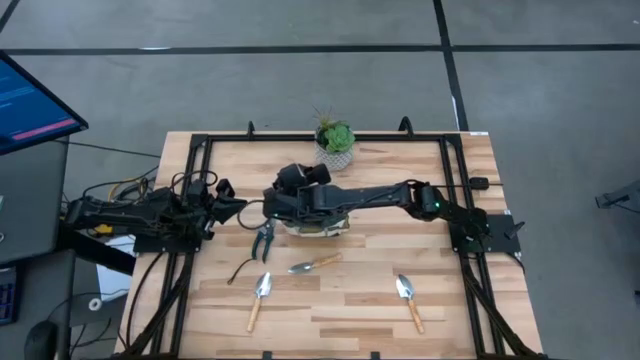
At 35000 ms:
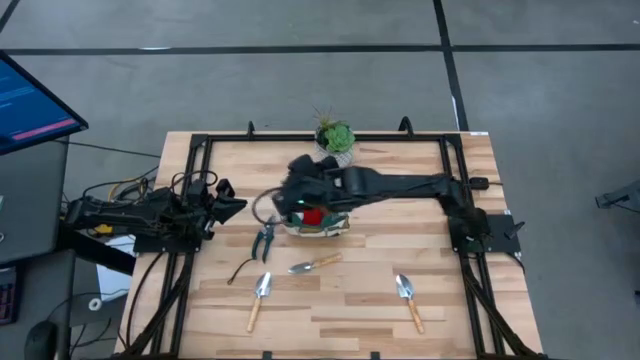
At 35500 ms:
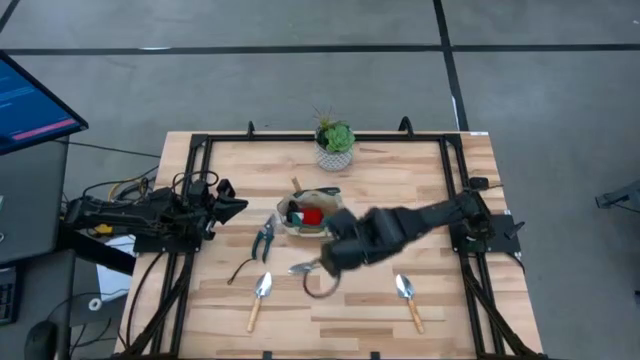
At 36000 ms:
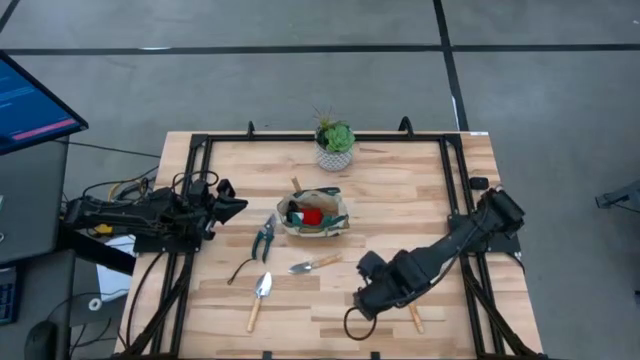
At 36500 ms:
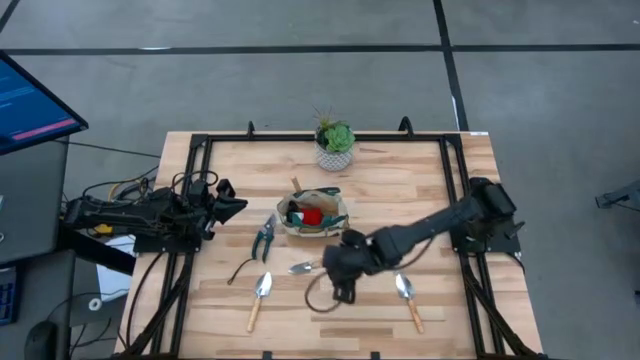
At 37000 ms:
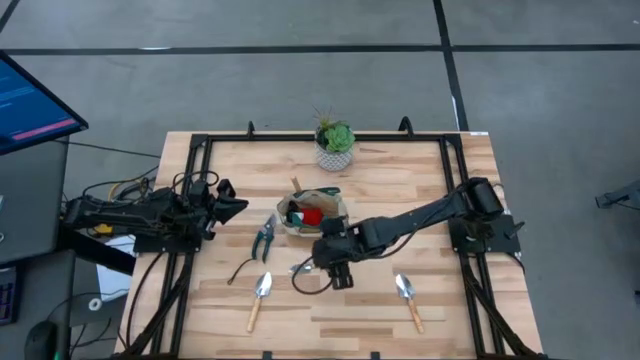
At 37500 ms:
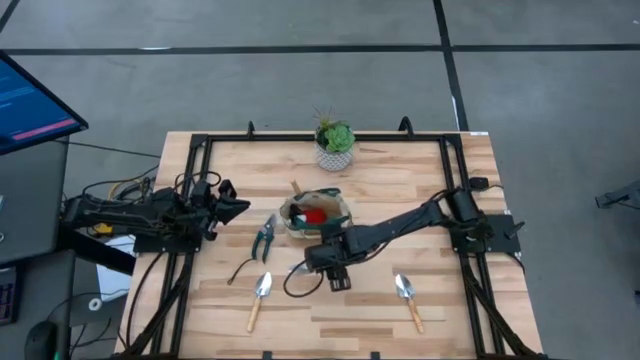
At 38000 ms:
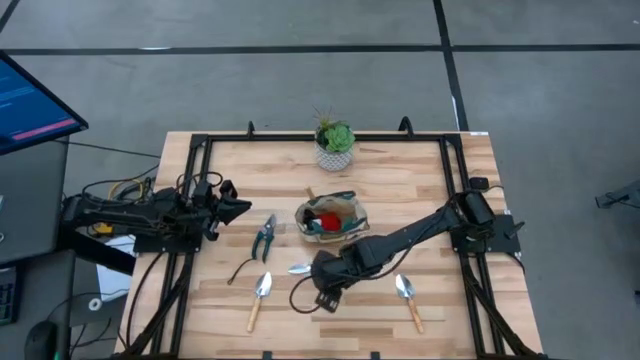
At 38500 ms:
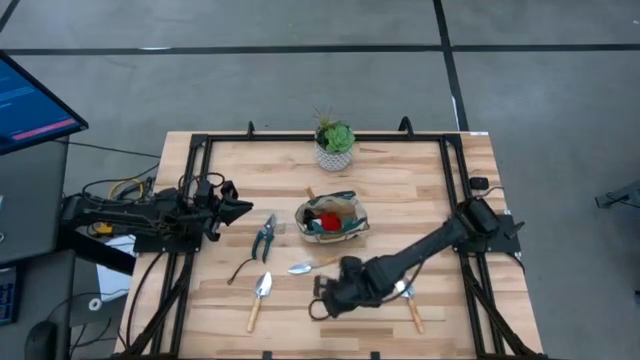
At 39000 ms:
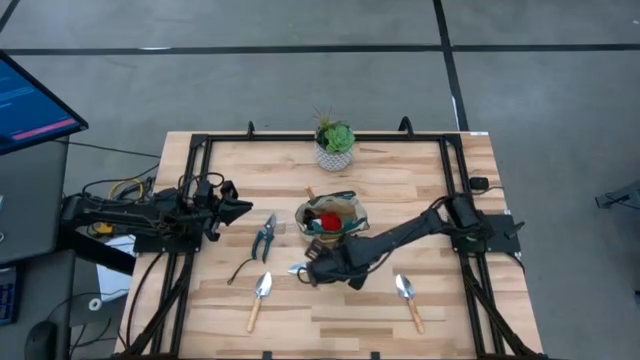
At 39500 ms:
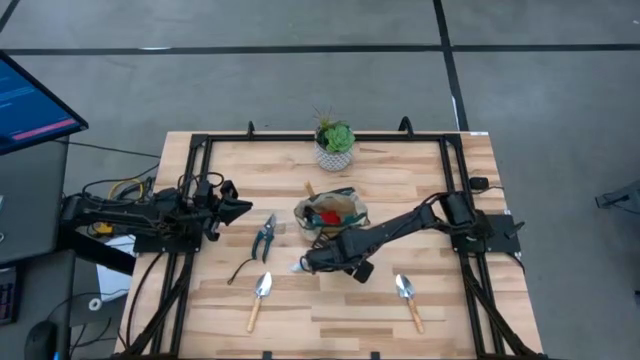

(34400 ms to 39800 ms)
Task: Pick & Place Garden tools in Gardening bag
Put the small trowel into the gardening bag

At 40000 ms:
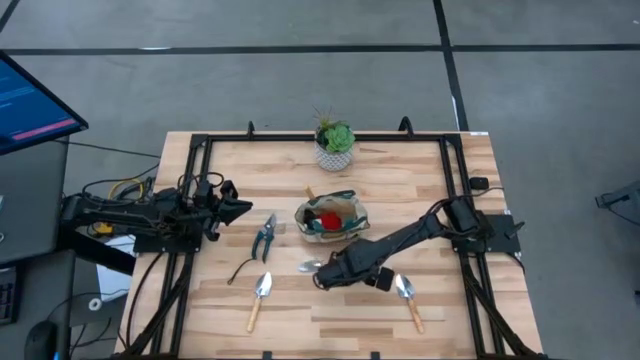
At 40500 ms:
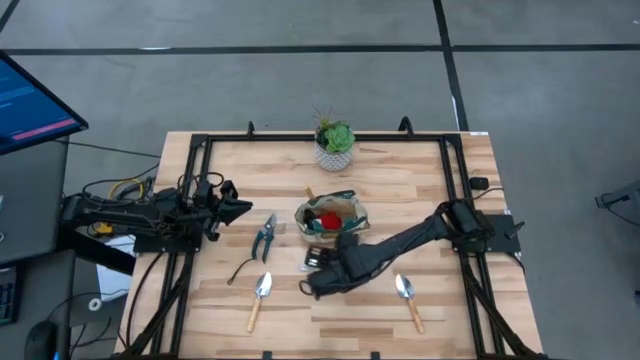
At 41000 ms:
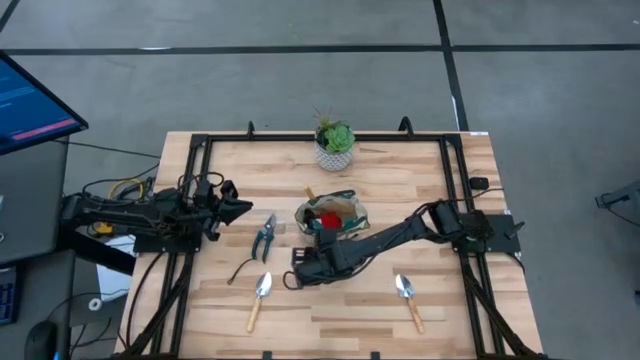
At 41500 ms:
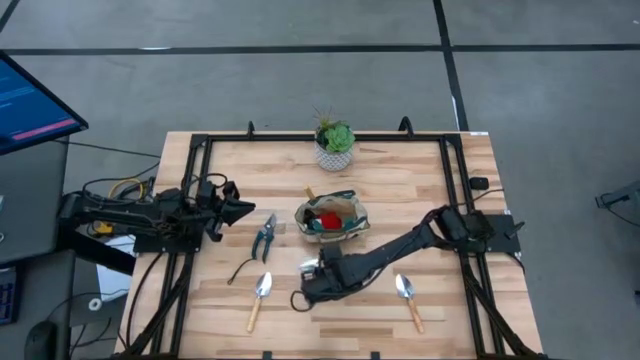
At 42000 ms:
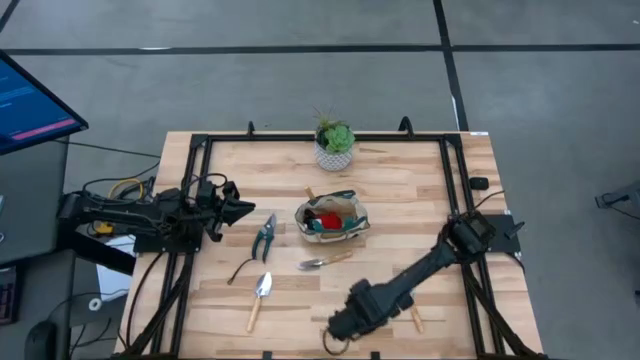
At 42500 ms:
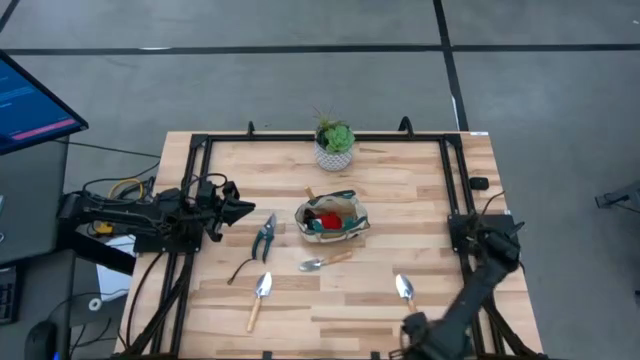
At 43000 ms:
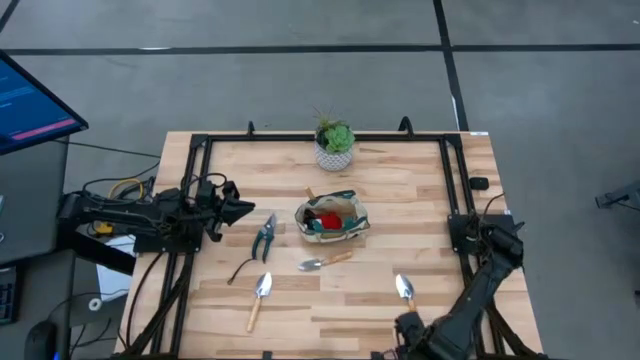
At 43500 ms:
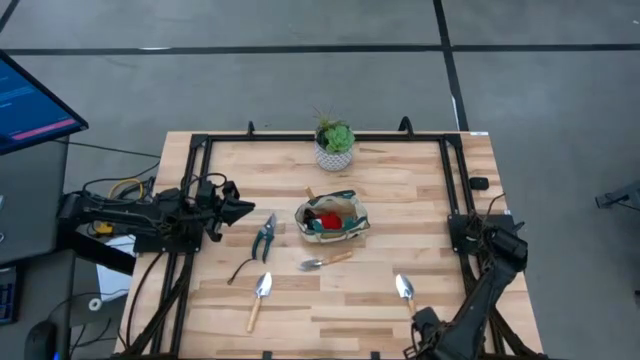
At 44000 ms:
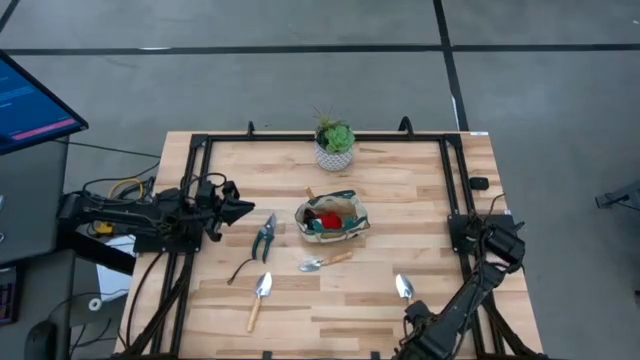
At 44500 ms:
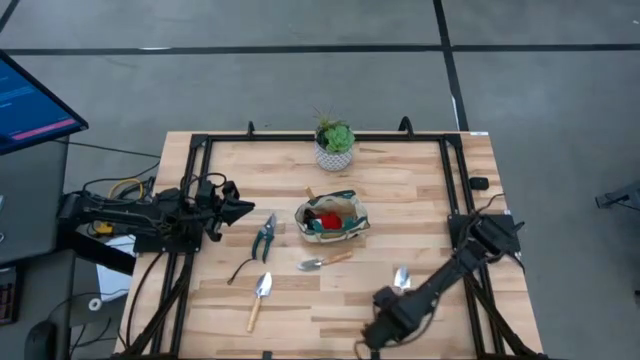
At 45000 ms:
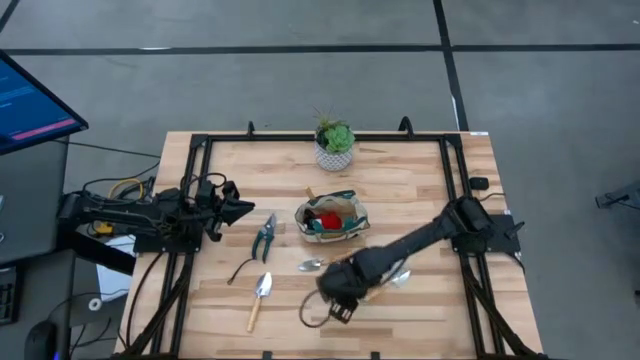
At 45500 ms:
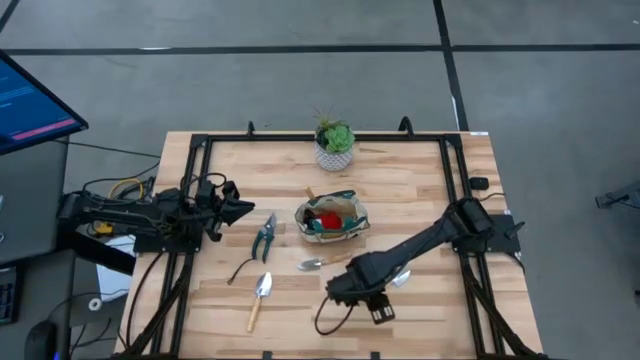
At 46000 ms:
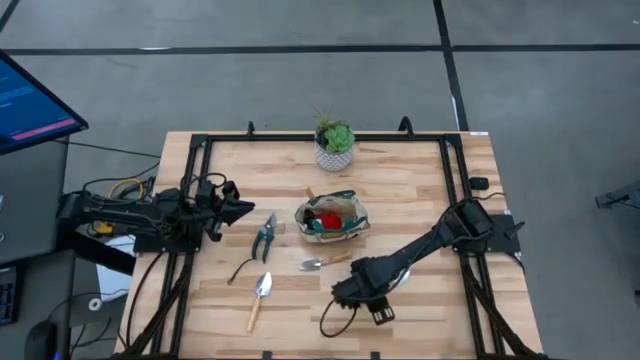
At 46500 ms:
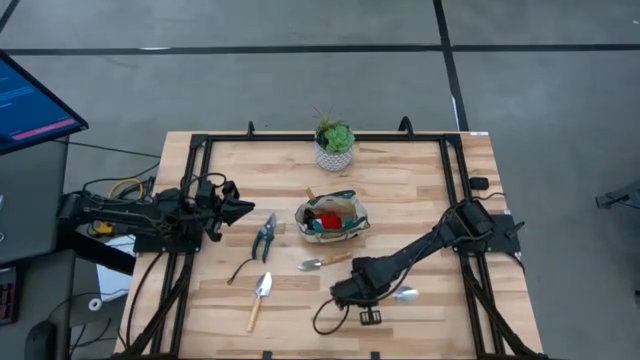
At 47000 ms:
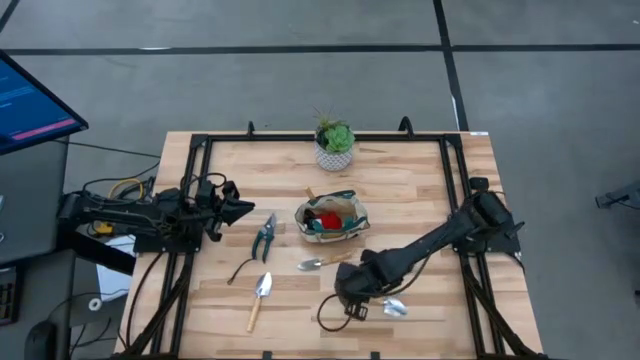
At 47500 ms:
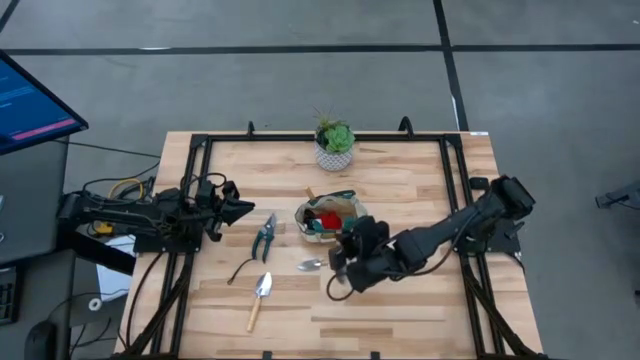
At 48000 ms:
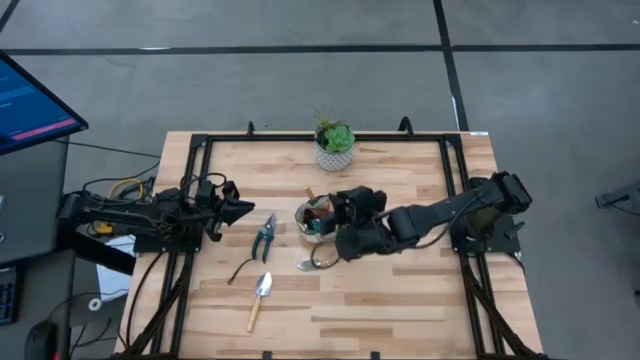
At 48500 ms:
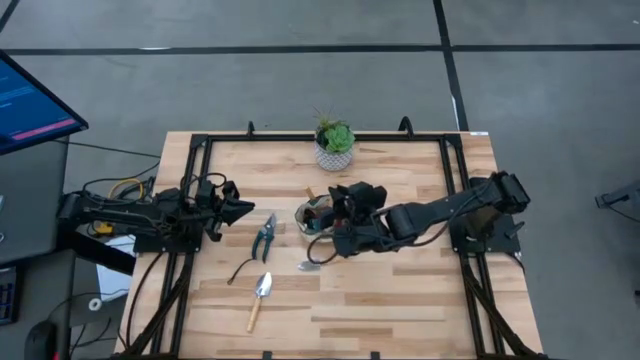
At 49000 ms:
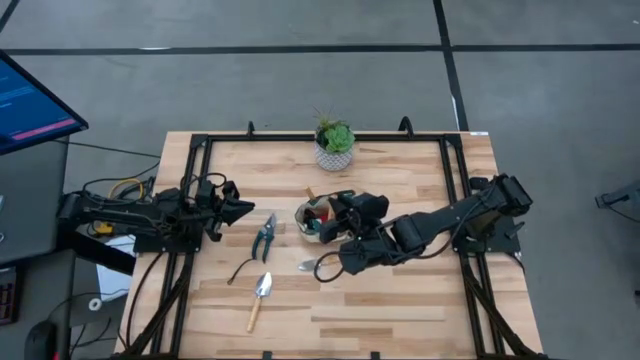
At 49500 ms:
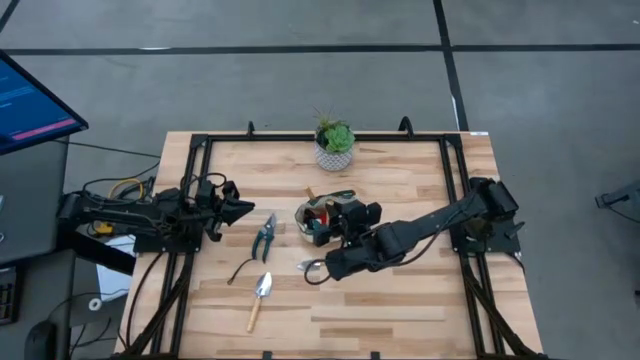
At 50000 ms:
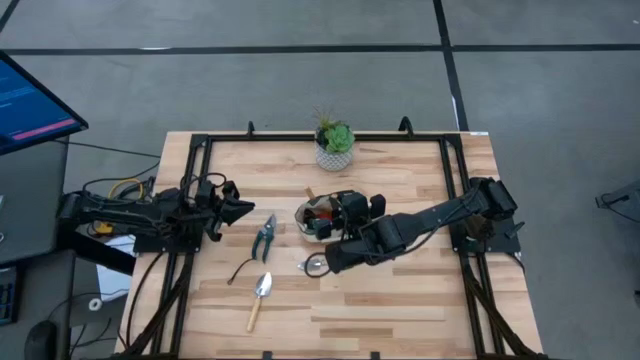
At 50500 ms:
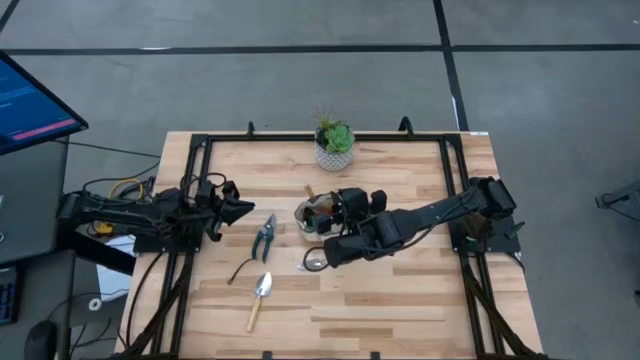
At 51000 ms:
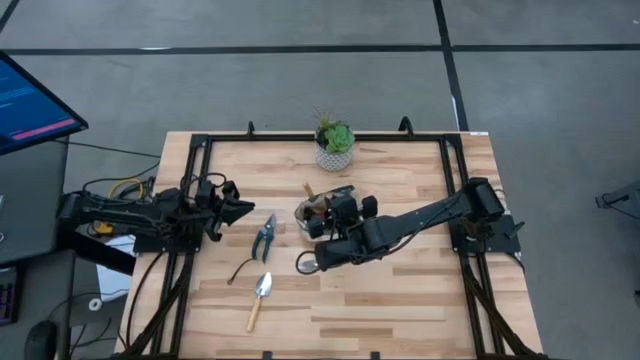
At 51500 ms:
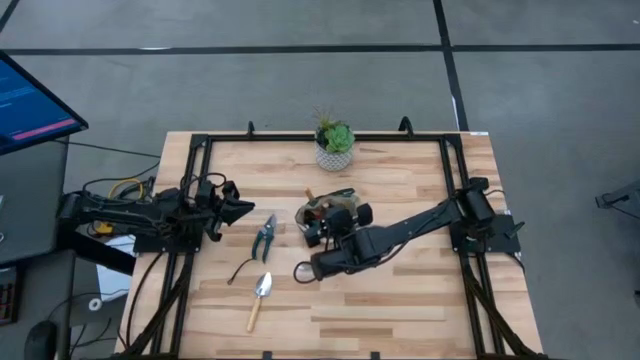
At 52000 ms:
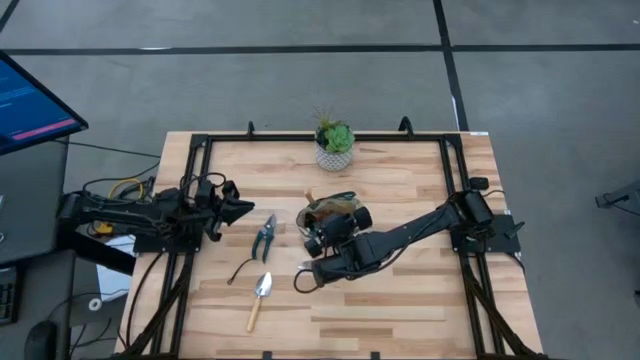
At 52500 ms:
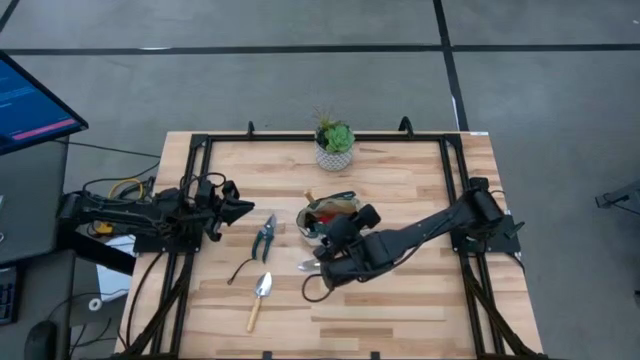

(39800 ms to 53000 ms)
Put the right trowel into the gardening bag

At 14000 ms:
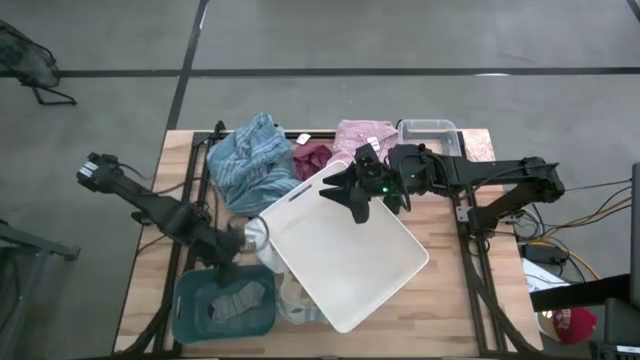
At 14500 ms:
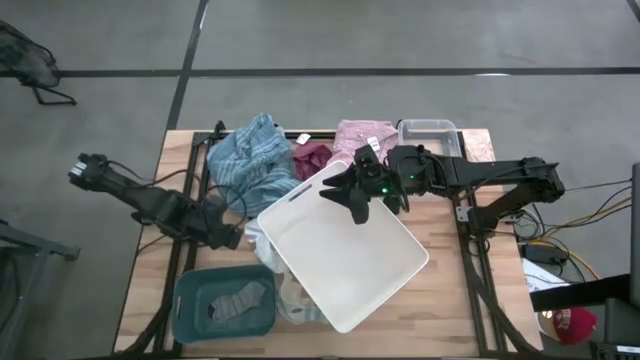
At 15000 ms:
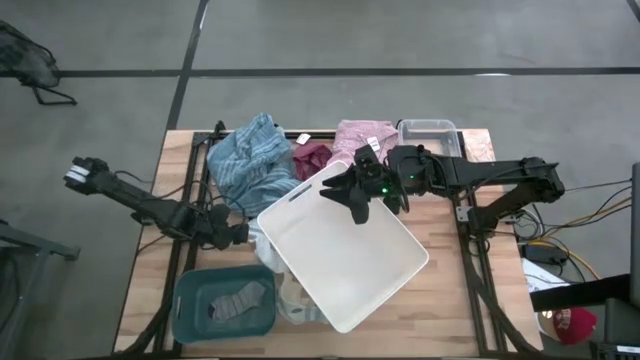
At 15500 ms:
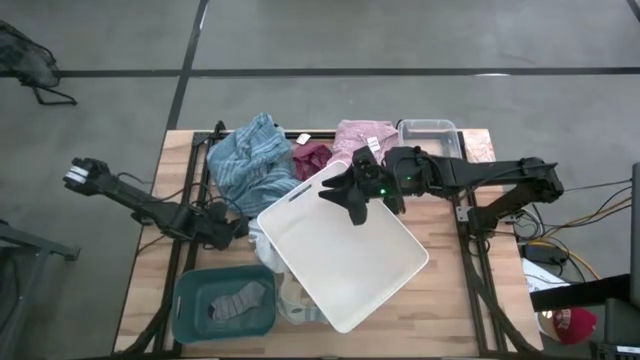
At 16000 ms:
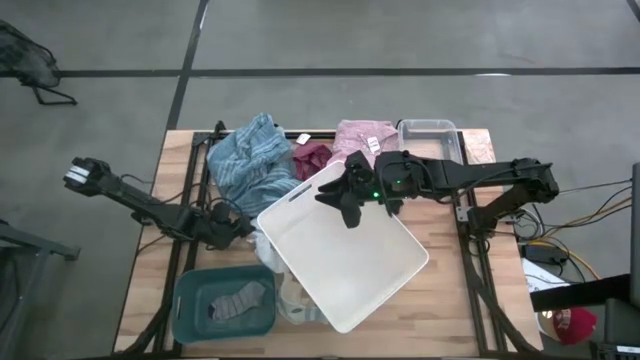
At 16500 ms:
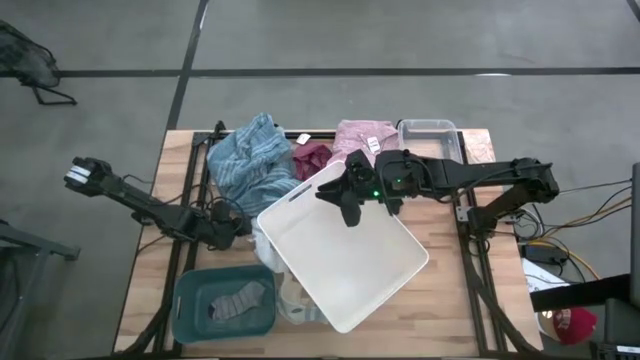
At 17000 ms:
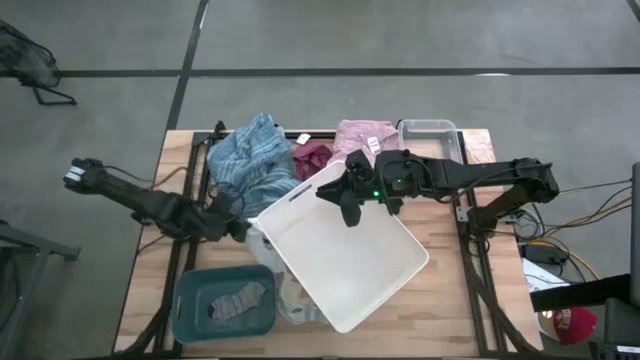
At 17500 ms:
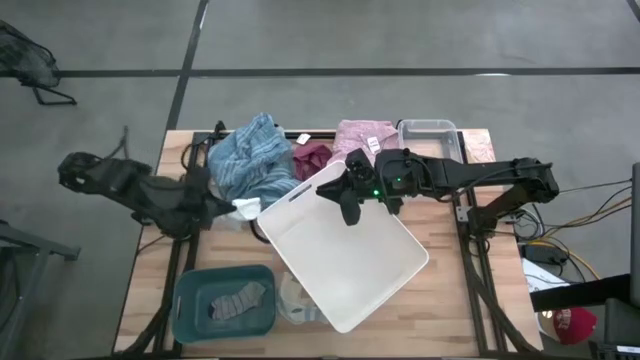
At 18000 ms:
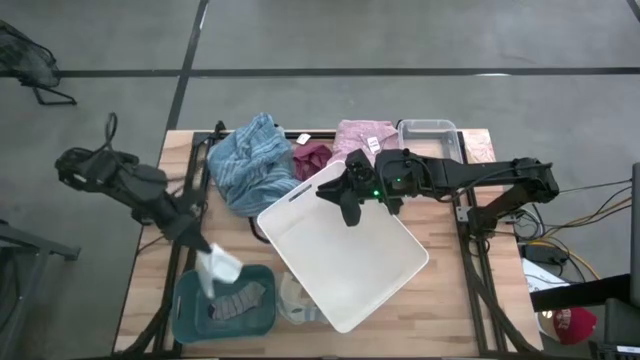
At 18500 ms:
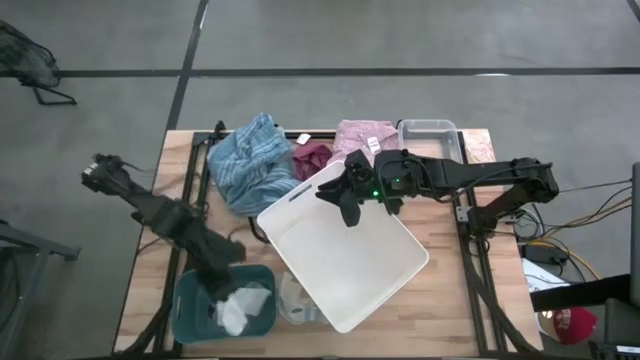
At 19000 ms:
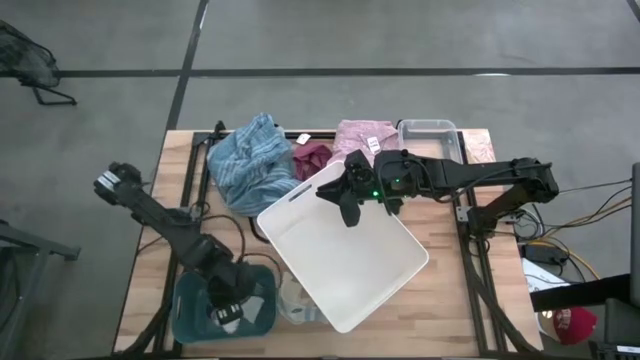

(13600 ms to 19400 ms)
Task: Pick & Place Cloths
Put the white sock into the green bin
